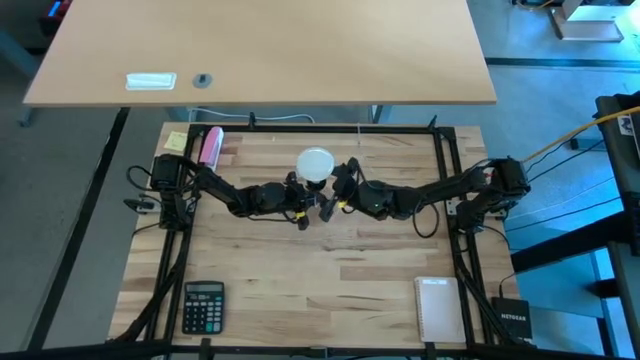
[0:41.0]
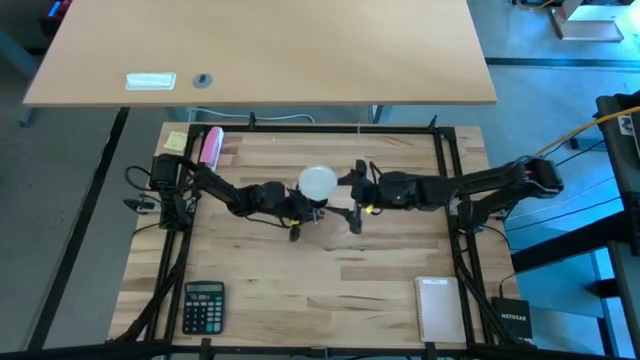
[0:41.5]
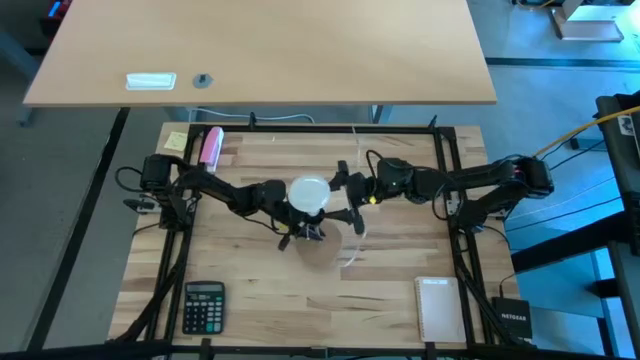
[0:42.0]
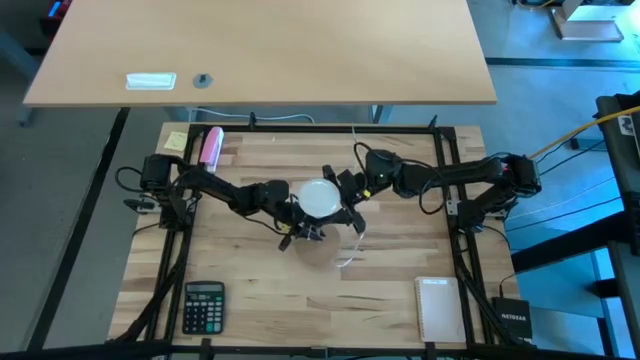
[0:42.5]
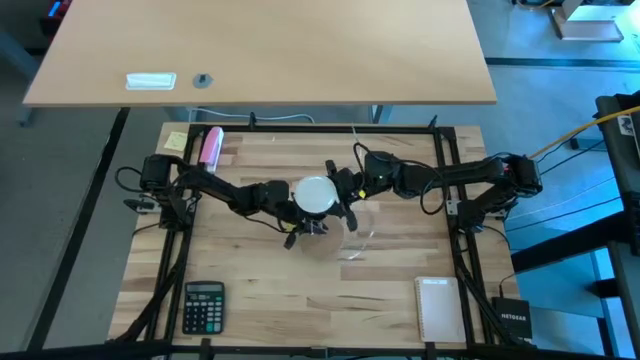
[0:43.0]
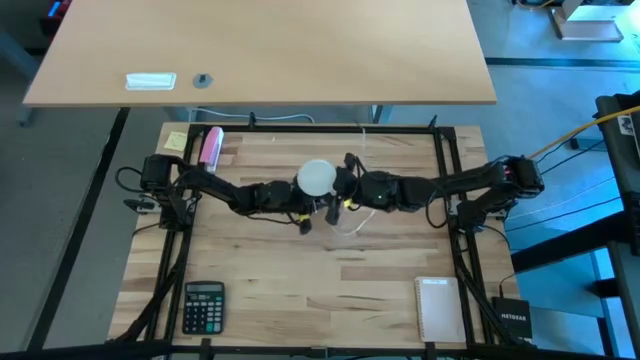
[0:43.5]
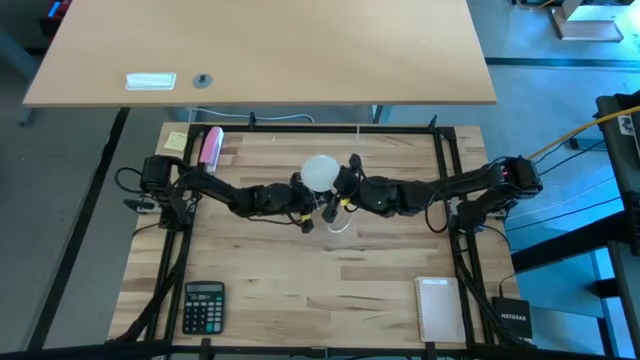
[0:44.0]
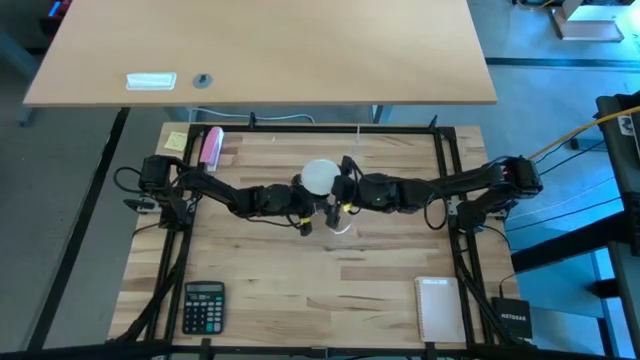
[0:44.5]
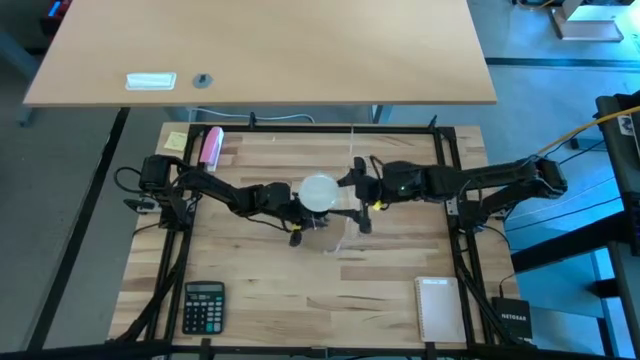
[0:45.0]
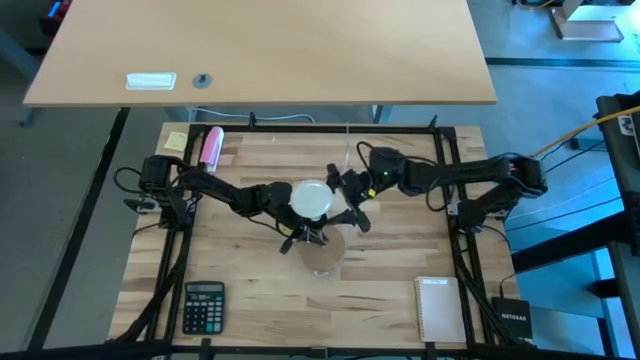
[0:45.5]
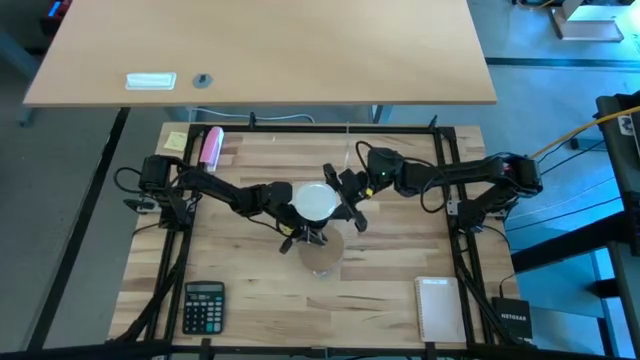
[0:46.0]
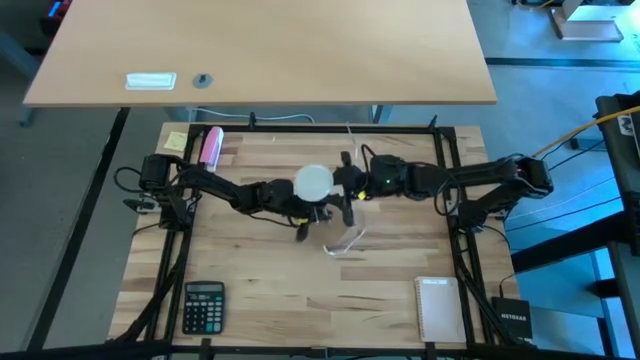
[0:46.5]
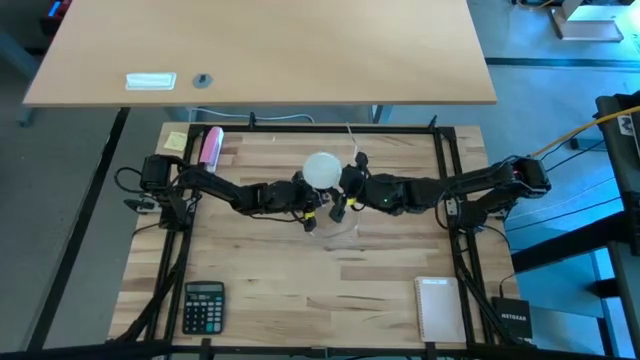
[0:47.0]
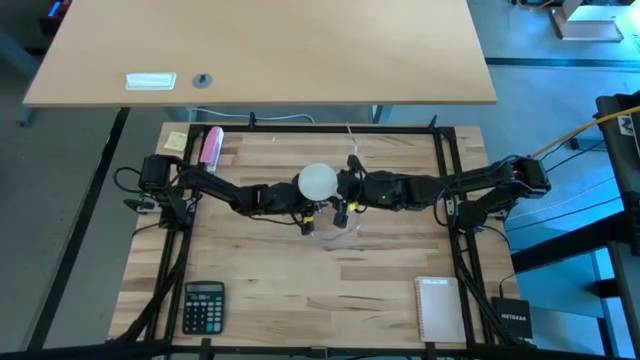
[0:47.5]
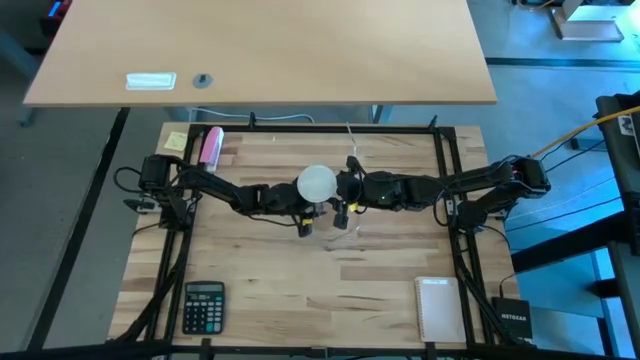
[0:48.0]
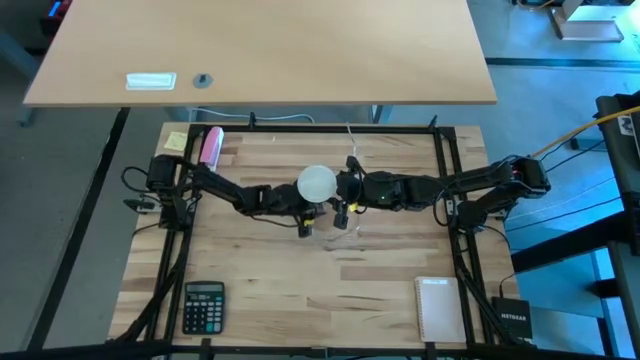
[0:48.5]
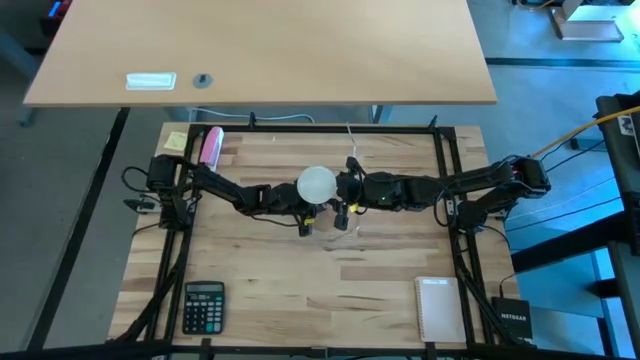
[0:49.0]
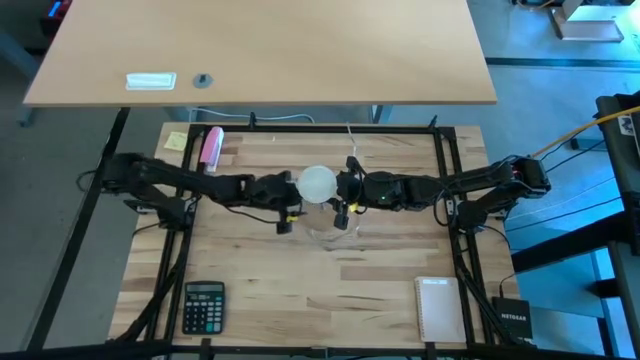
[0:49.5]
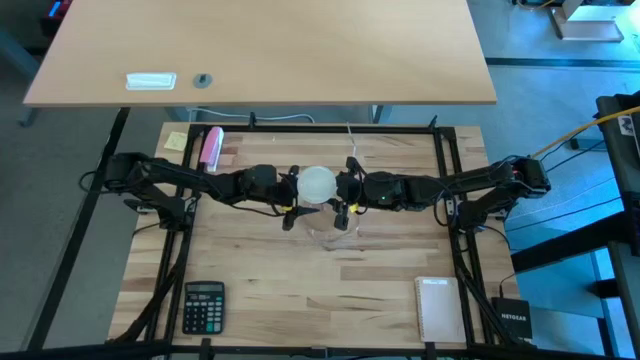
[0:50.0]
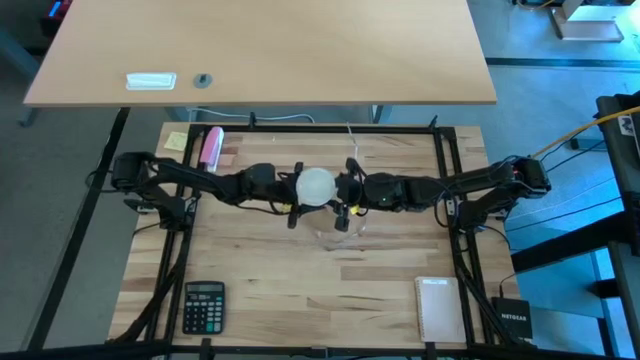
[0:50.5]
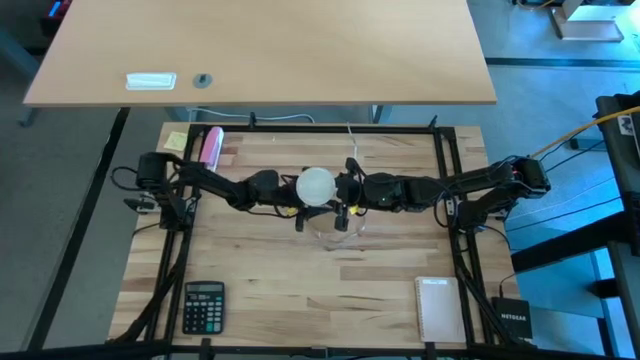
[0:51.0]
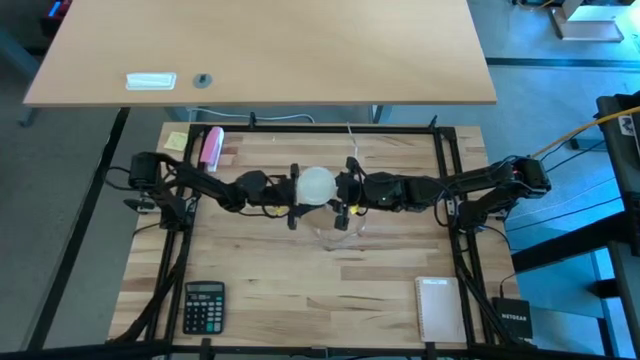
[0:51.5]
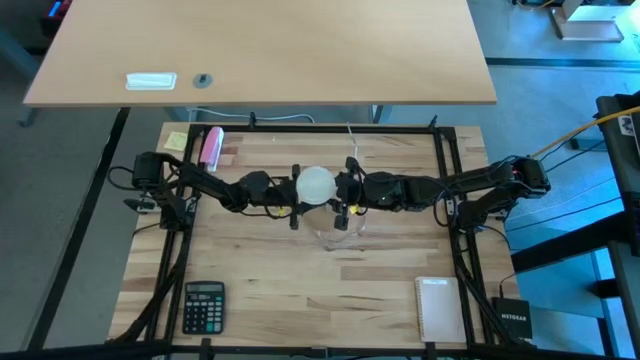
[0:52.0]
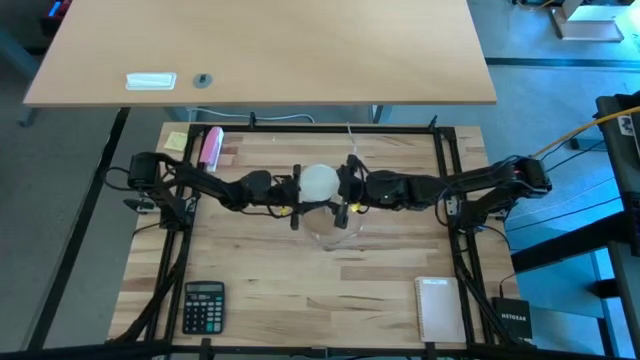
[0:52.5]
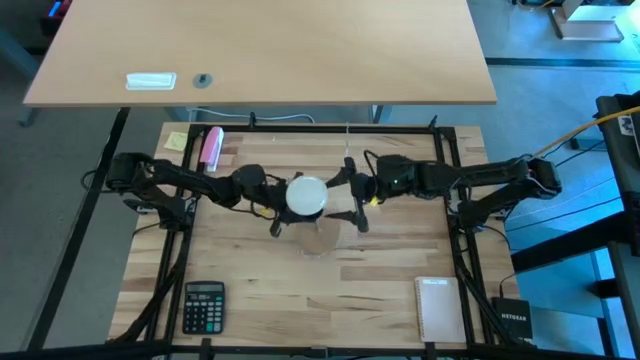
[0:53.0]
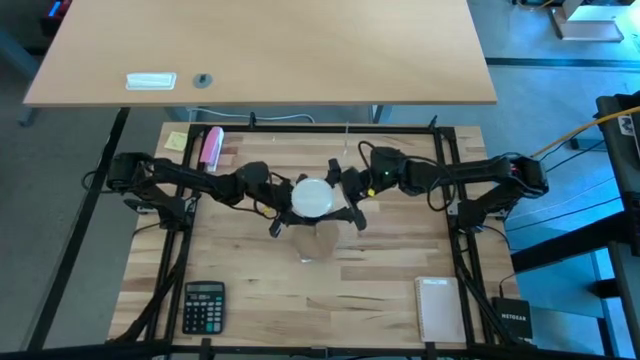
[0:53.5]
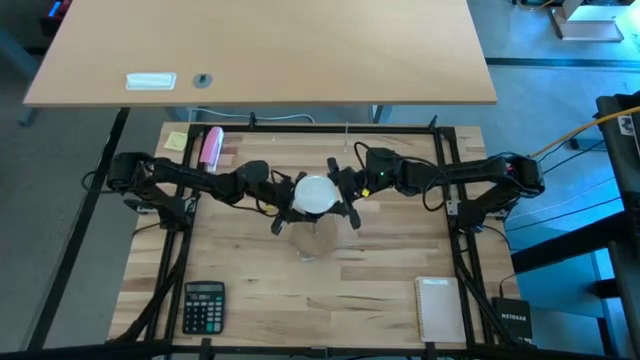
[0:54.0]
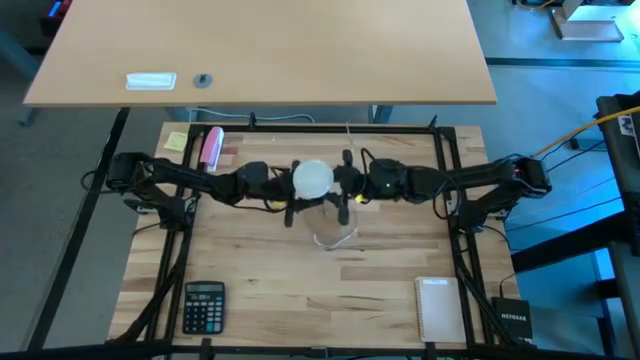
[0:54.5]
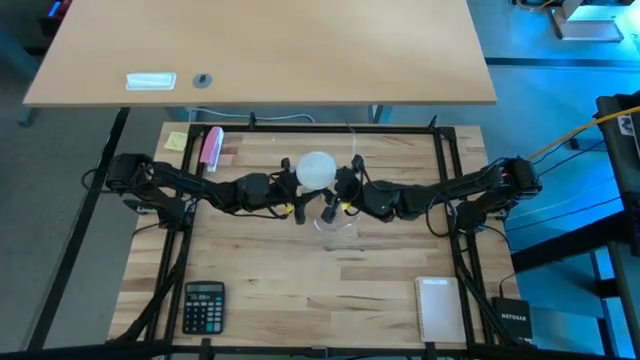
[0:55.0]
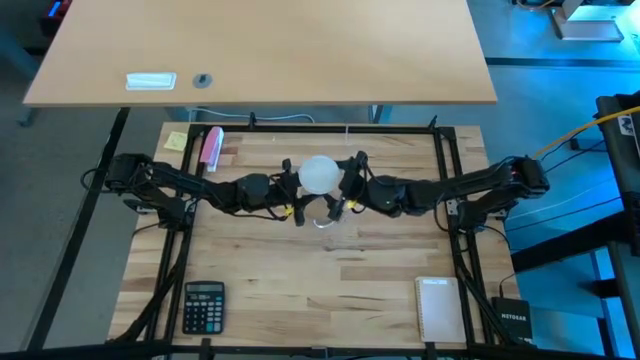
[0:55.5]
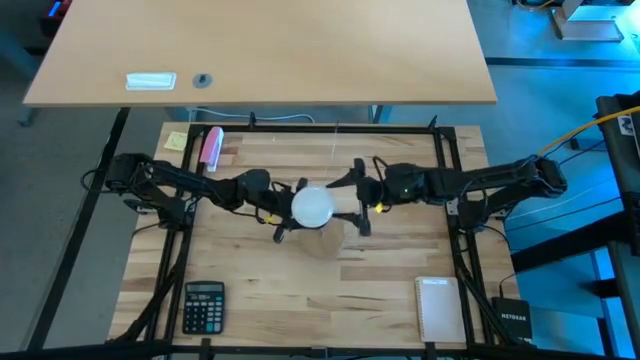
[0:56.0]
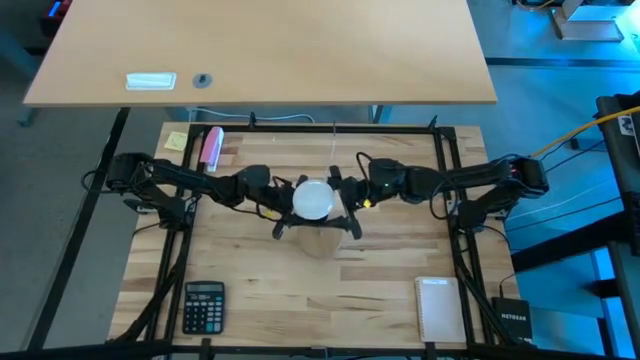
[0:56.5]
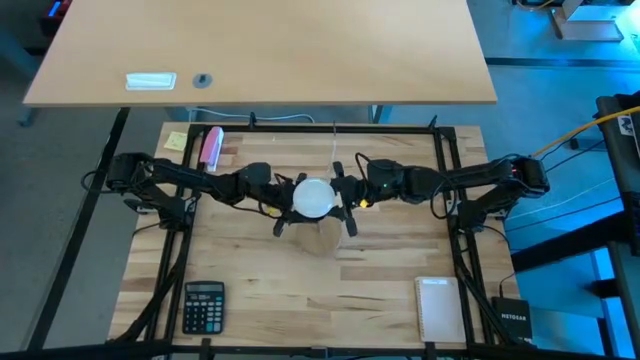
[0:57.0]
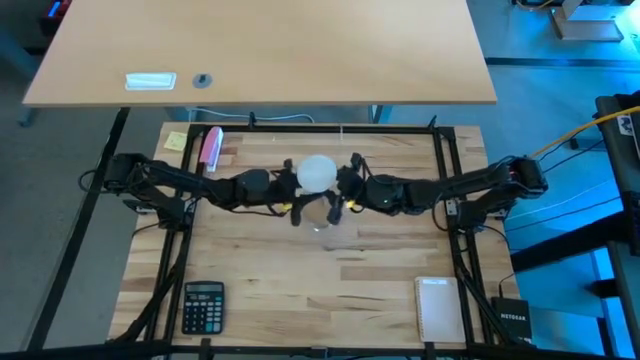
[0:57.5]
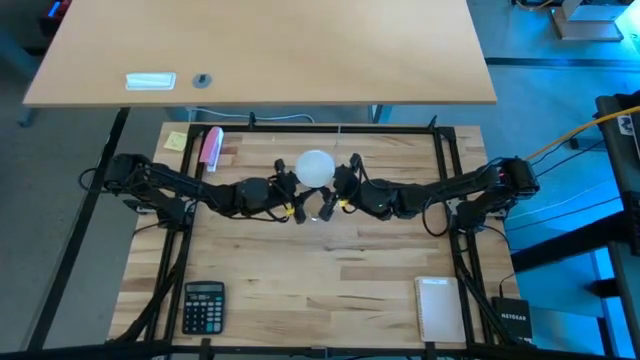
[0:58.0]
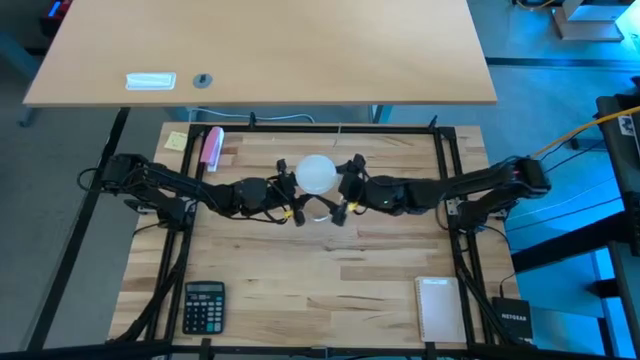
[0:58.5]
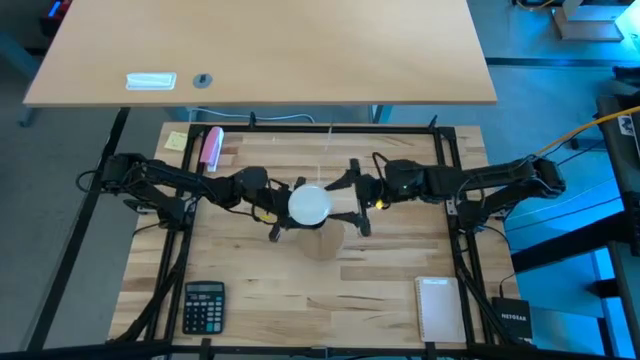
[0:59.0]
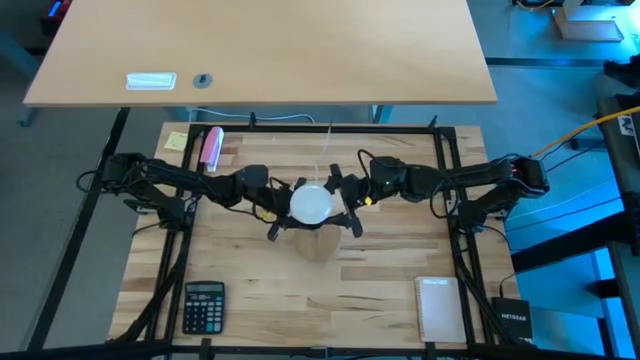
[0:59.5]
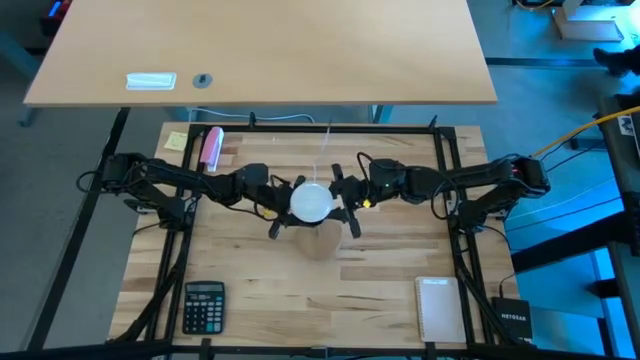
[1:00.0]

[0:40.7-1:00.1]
Task: Screw lightbulb
Insert the white lightbulb into the brown lamp
